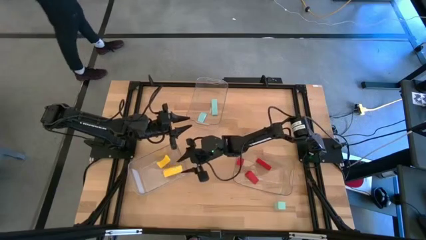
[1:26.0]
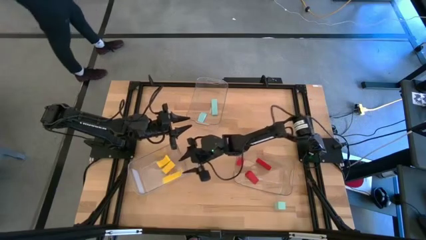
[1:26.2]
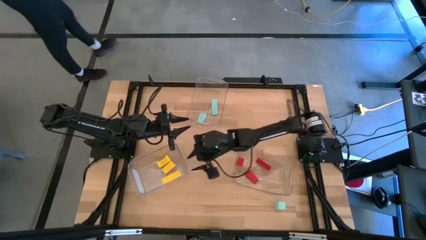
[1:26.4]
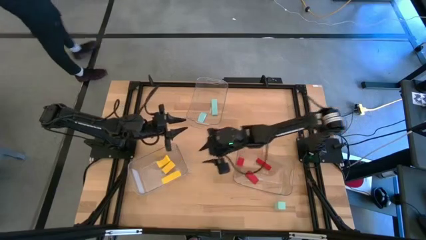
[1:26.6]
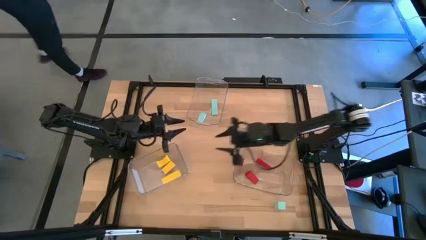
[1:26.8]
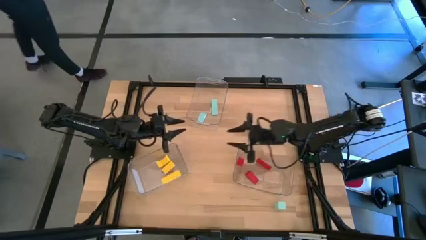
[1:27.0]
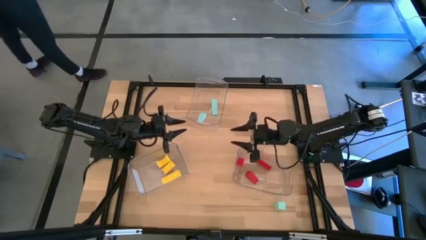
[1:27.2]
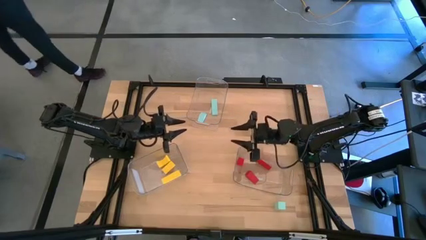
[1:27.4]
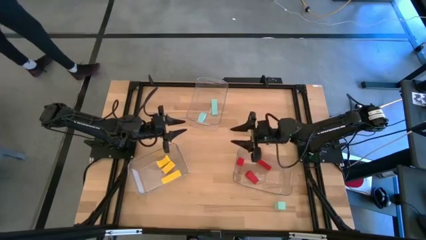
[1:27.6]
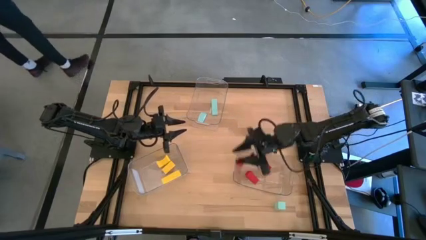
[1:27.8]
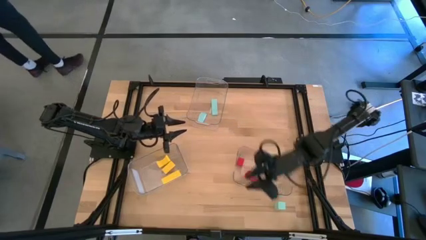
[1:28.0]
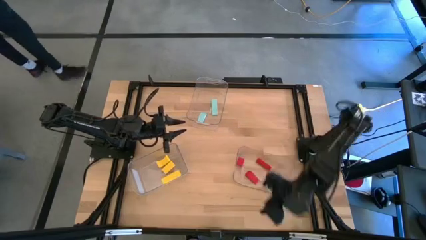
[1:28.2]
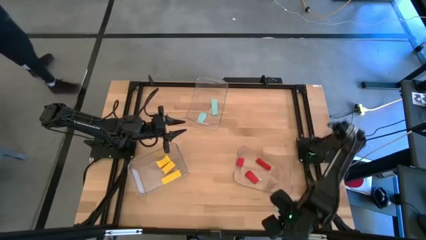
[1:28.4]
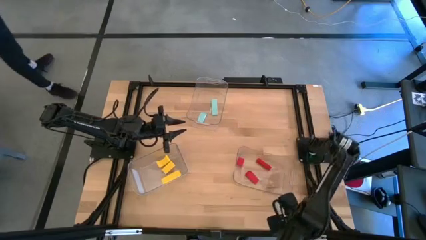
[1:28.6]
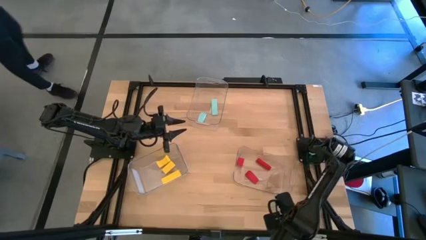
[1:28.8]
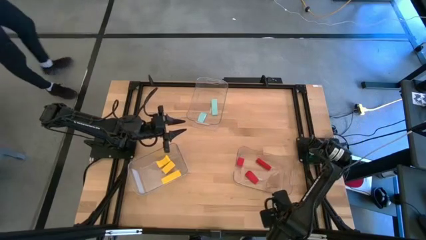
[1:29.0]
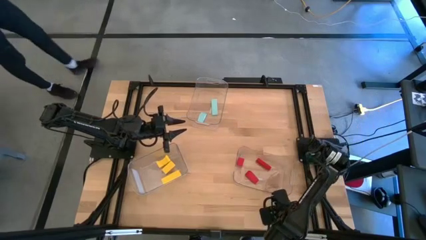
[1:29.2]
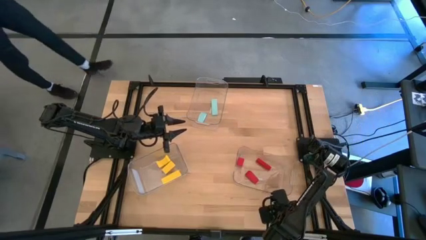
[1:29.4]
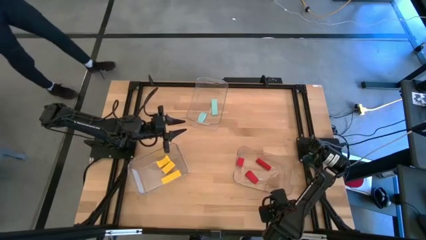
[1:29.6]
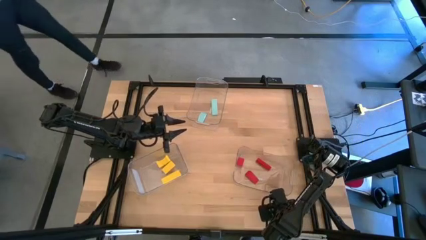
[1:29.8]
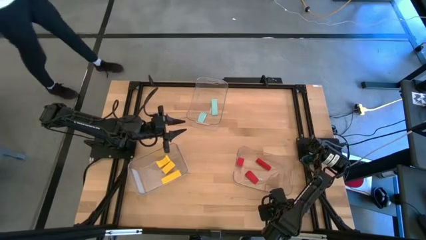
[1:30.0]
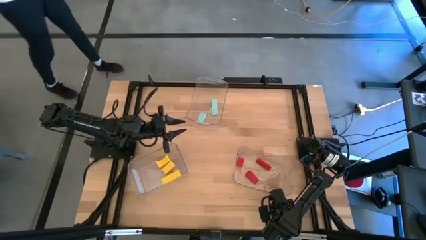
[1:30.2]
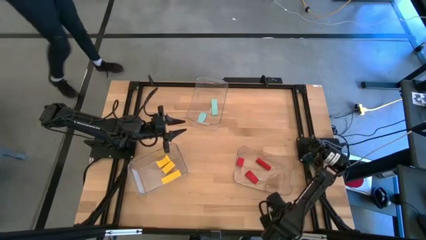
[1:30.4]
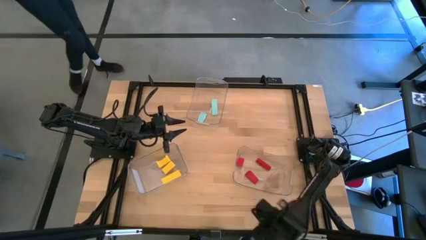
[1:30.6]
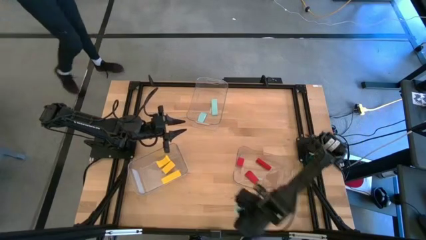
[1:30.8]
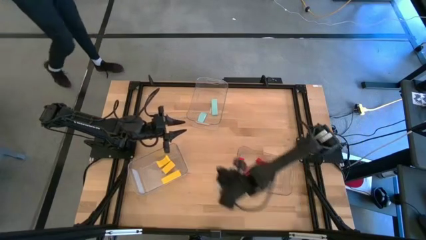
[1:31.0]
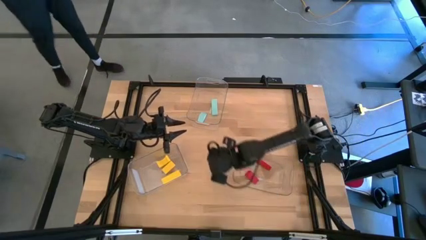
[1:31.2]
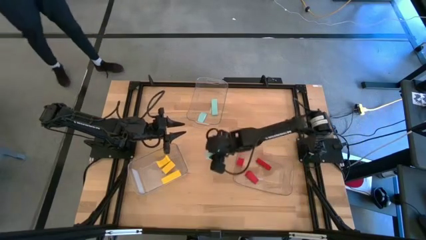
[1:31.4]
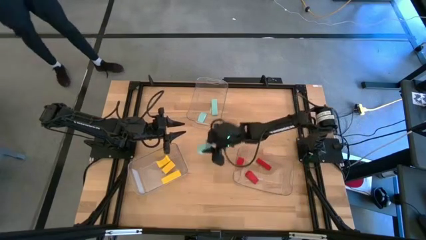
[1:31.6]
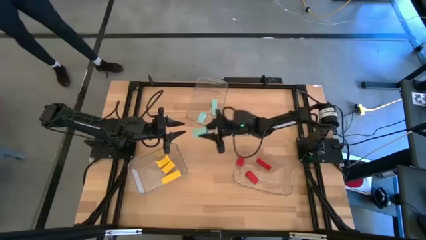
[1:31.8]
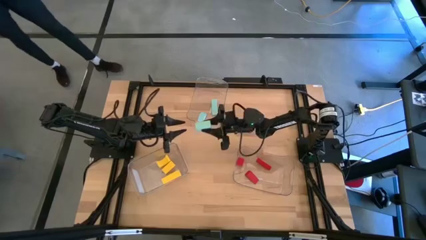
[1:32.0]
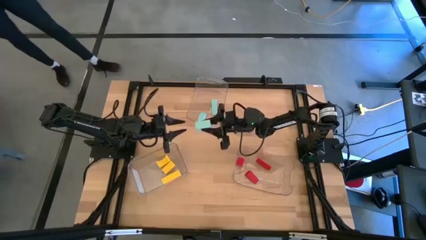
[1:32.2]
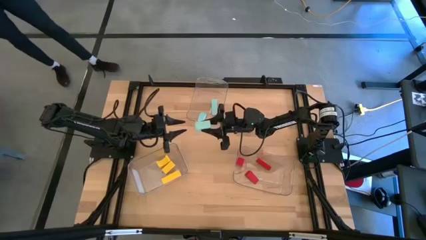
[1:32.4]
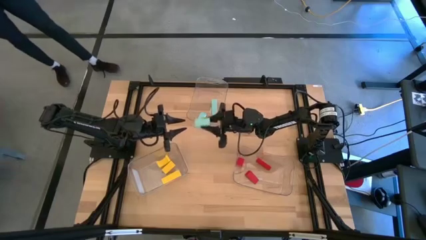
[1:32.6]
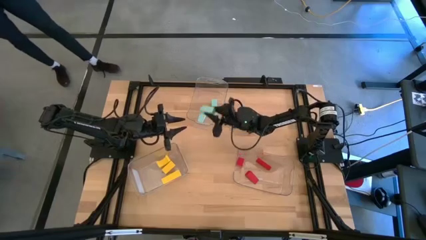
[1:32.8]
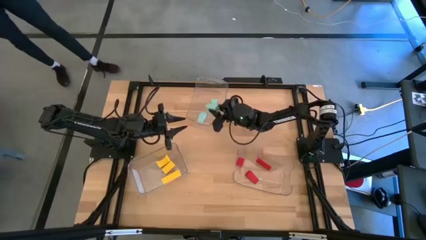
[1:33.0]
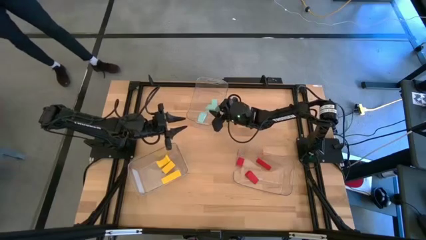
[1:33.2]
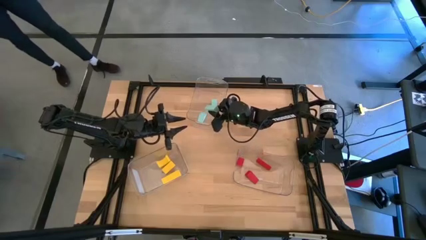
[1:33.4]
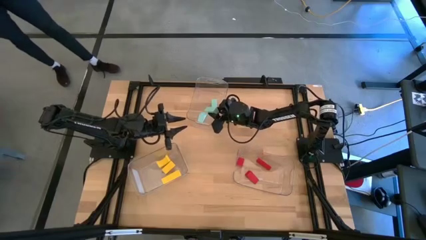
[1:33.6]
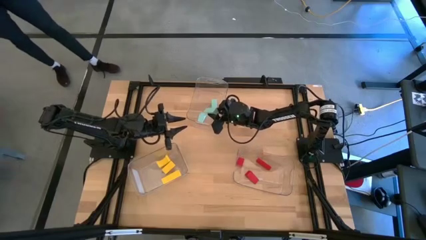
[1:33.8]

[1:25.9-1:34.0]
Task: Sort & place blocks by color
Put the blue block into the top transparent bin

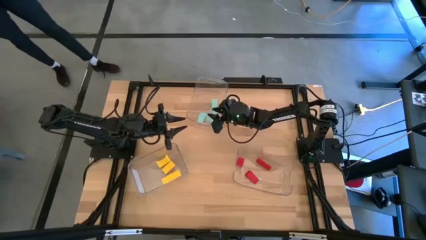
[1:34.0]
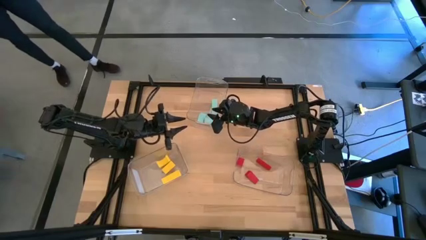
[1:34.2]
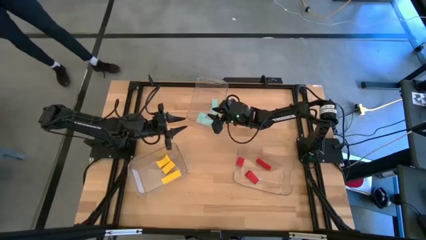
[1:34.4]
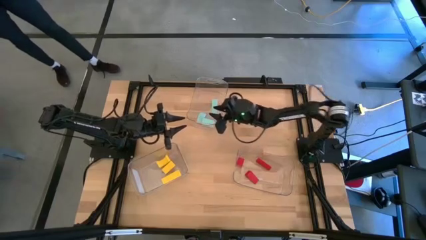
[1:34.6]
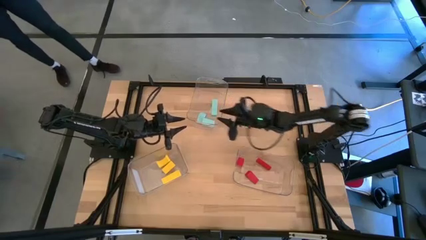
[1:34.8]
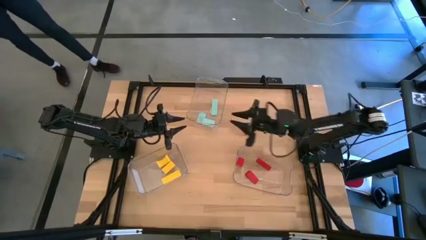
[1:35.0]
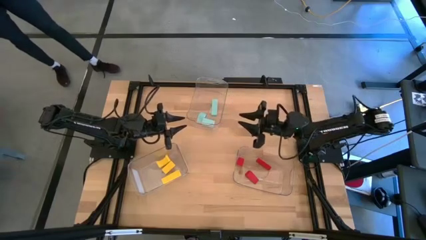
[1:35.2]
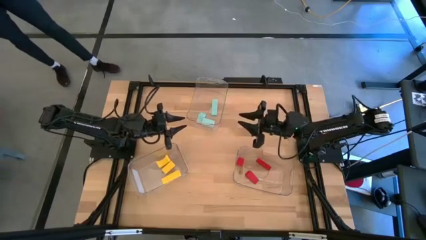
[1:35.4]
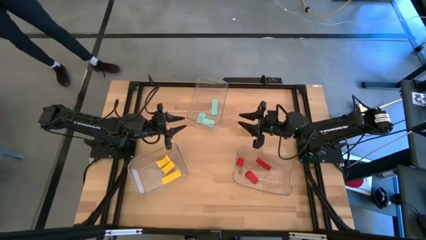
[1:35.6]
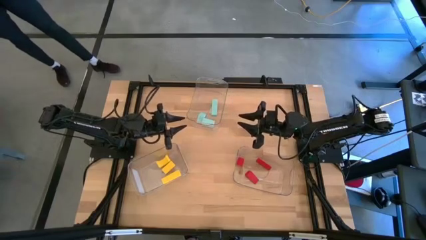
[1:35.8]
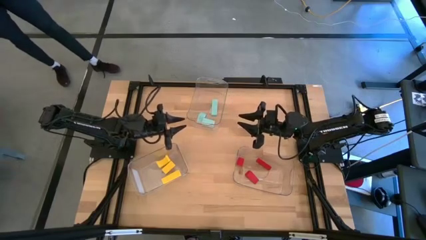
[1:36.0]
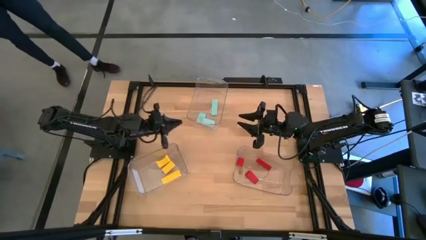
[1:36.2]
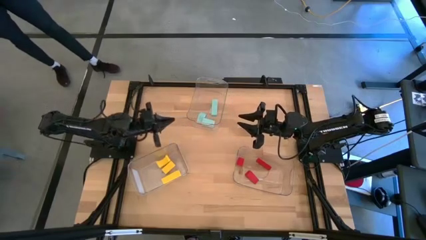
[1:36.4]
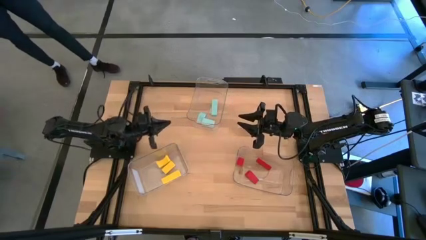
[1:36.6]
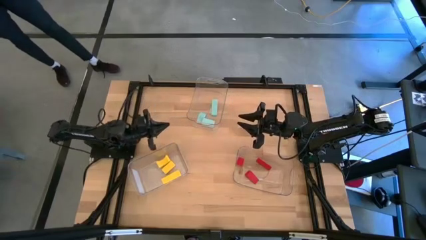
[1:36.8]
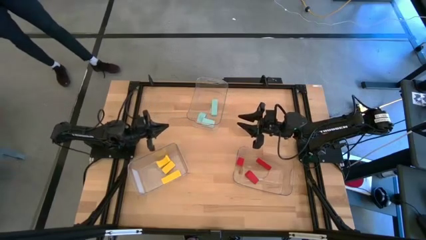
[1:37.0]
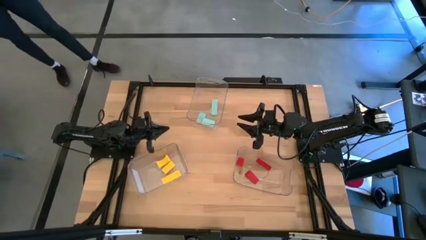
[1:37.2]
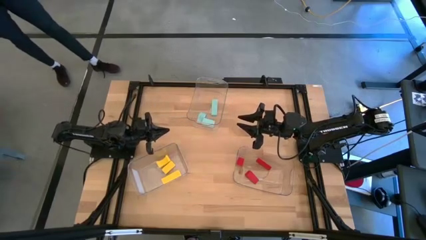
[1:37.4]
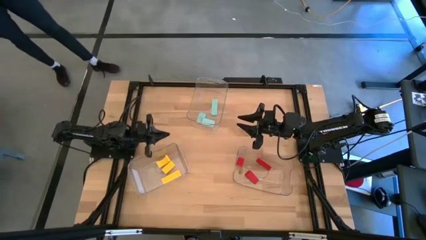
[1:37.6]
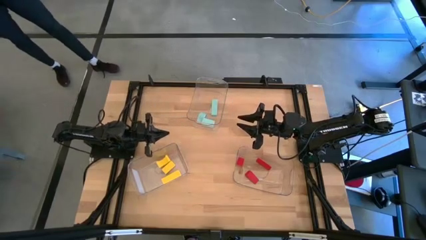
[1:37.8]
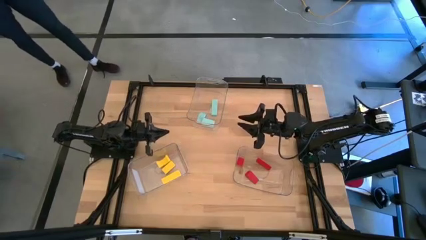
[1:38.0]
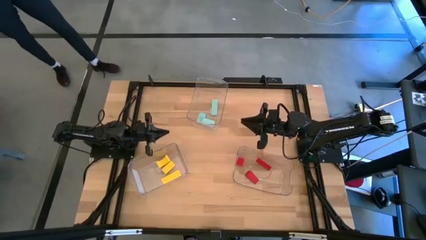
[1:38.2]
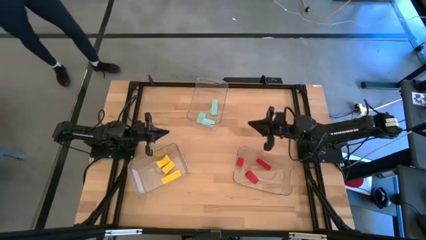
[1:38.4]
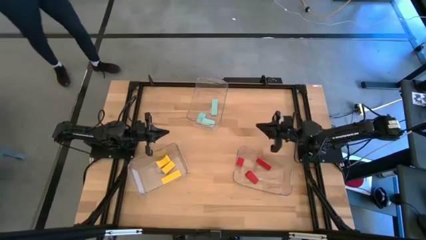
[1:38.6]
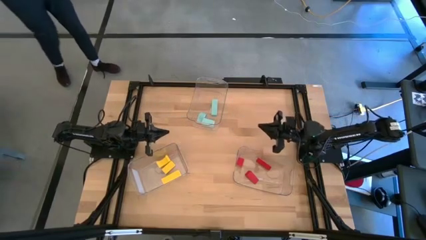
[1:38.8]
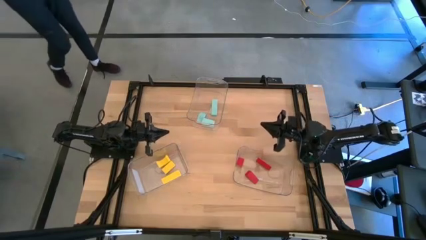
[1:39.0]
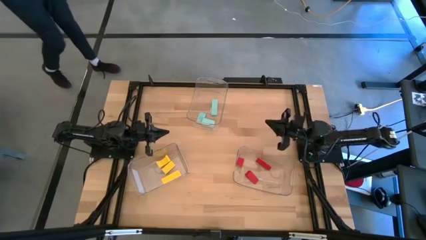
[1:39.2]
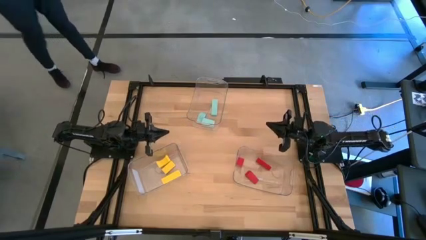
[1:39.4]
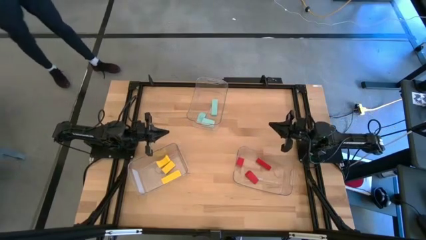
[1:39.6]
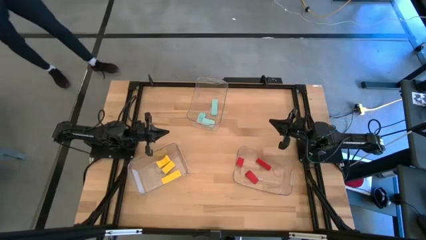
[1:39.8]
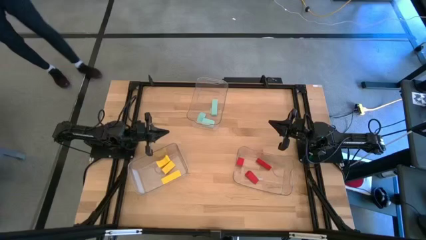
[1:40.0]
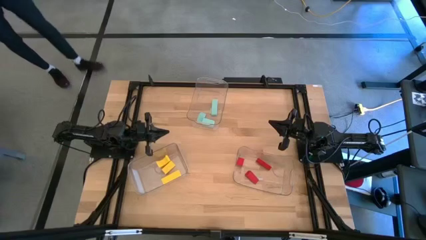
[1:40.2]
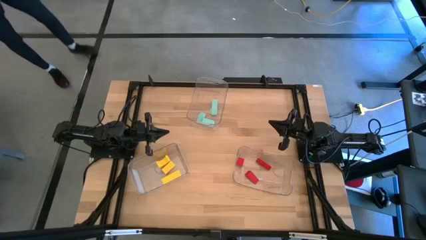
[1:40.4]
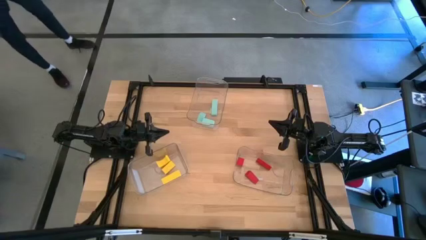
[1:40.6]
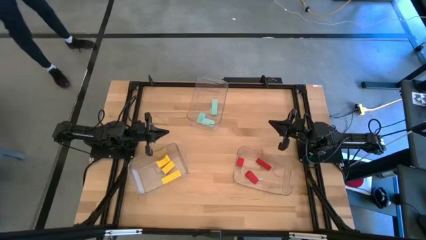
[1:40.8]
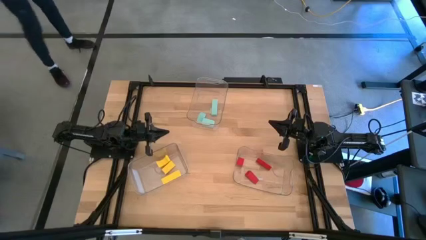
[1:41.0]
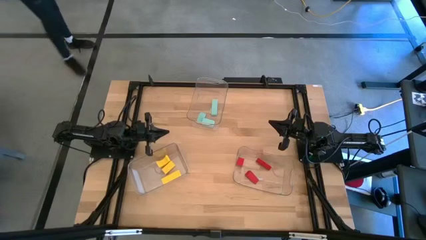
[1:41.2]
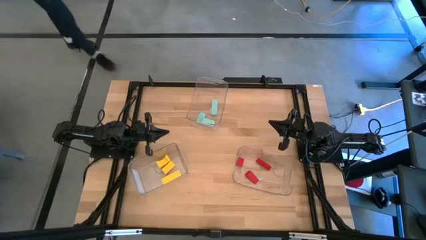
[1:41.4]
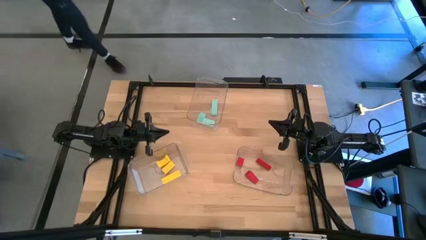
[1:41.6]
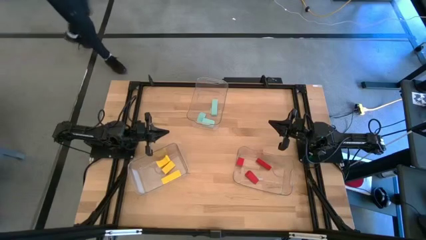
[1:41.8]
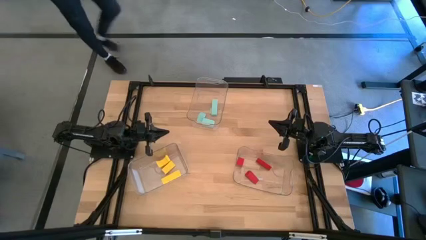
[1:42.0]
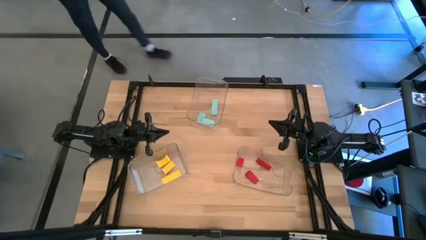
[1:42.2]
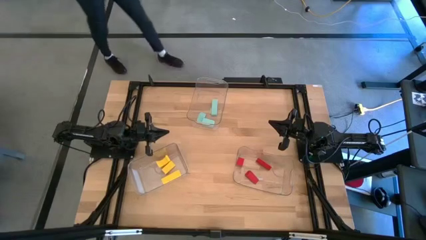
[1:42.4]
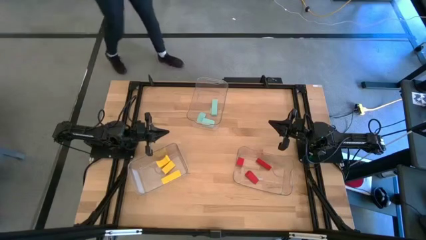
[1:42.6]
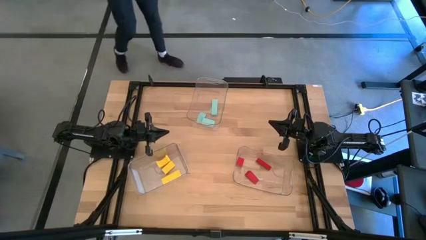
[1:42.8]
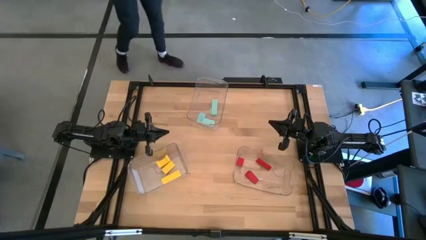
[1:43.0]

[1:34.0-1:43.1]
Return to Home Position
